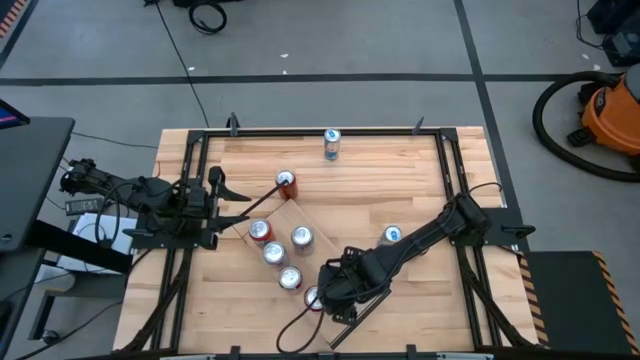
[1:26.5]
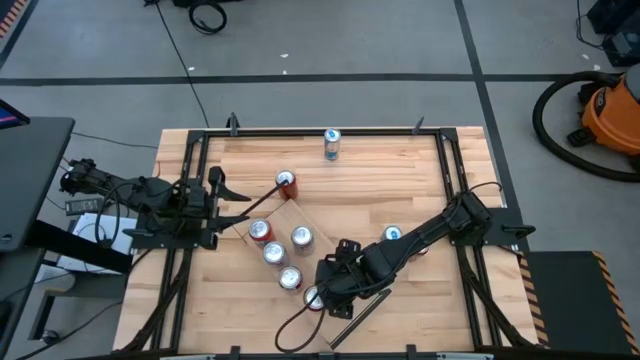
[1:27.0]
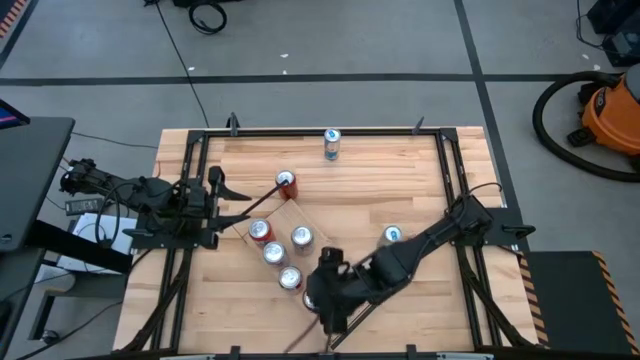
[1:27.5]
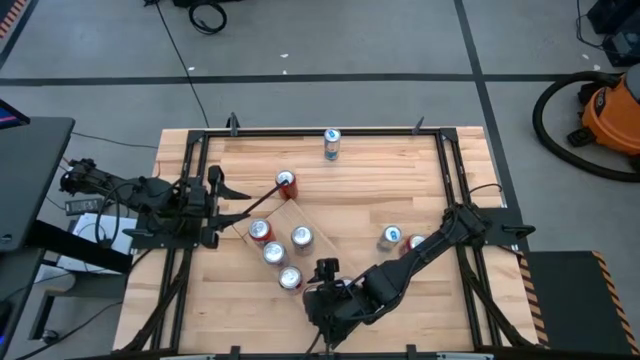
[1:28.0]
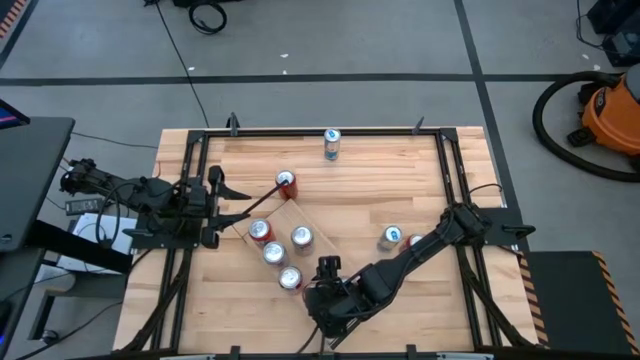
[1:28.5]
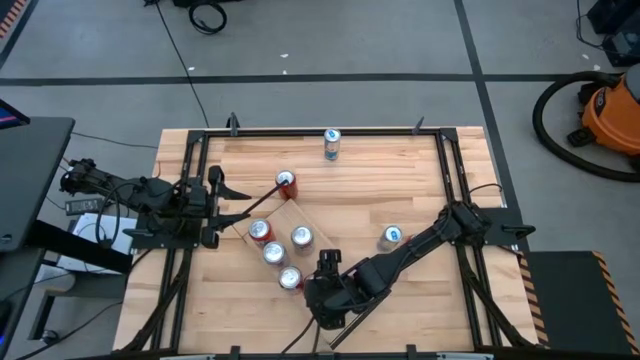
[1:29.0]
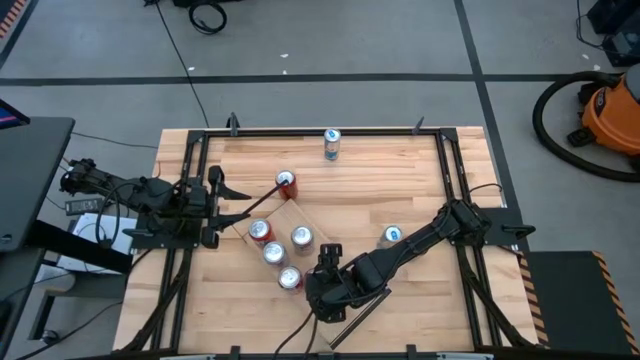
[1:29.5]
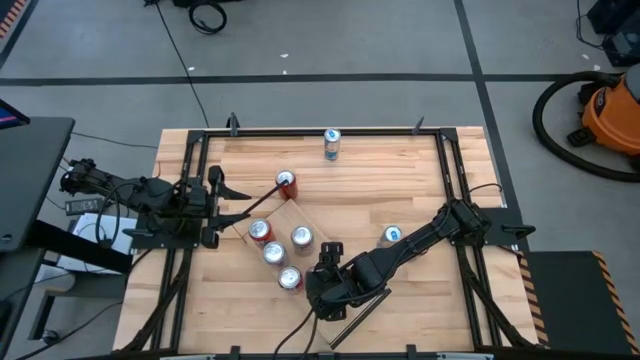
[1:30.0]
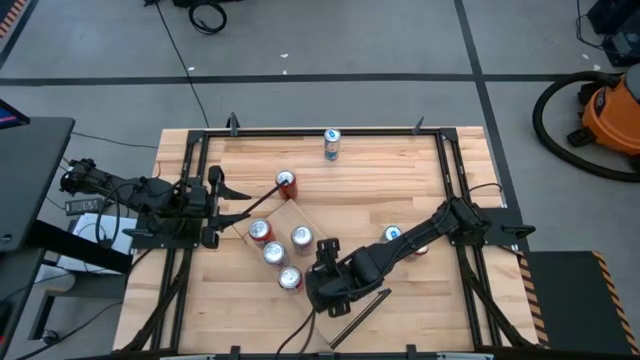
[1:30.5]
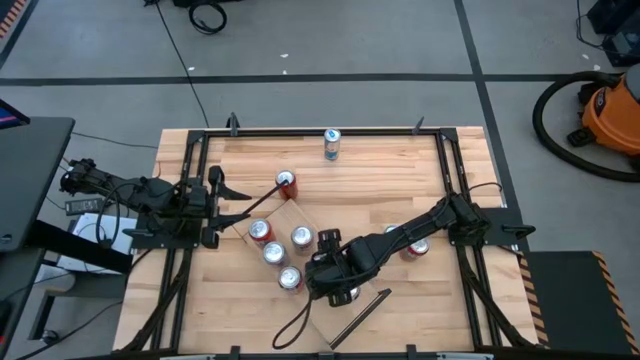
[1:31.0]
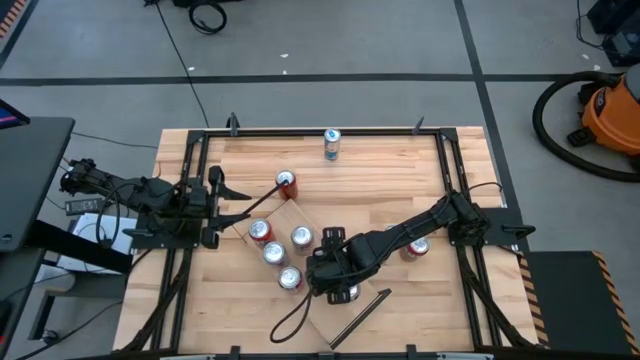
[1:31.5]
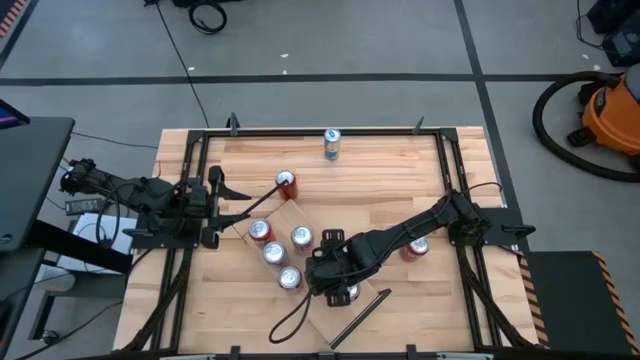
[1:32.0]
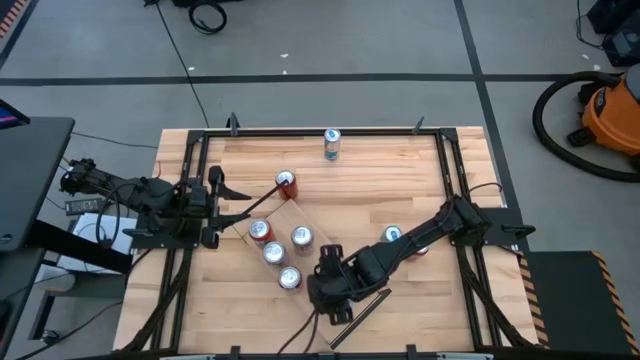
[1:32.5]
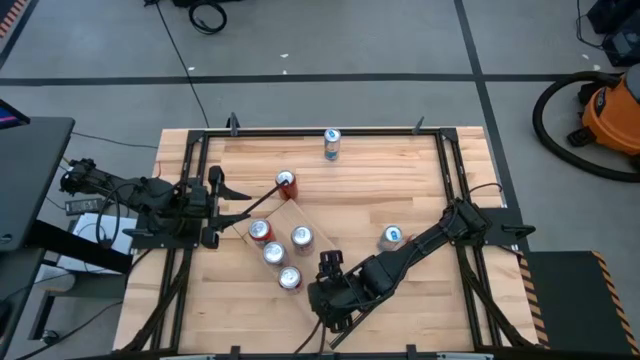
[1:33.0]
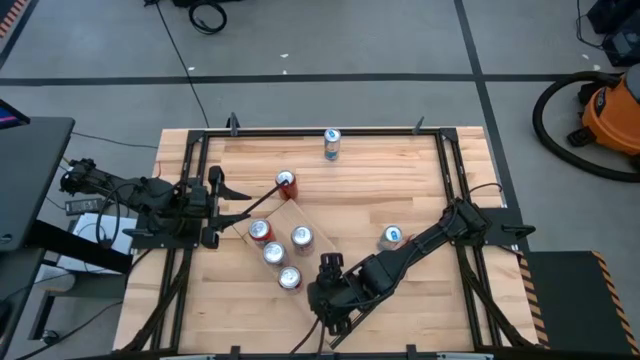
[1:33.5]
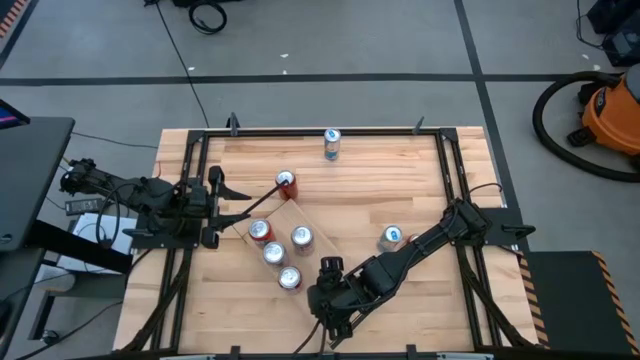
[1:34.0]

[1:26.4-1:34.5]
Task: Place canned beverage on shelf
Adjust the red and black soda can on the shelf

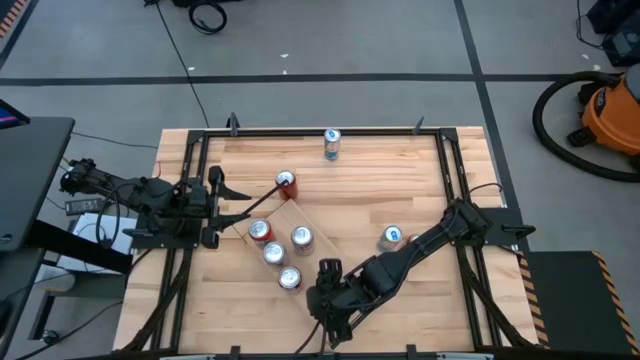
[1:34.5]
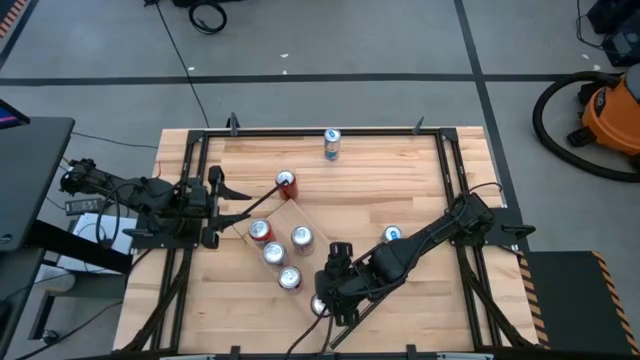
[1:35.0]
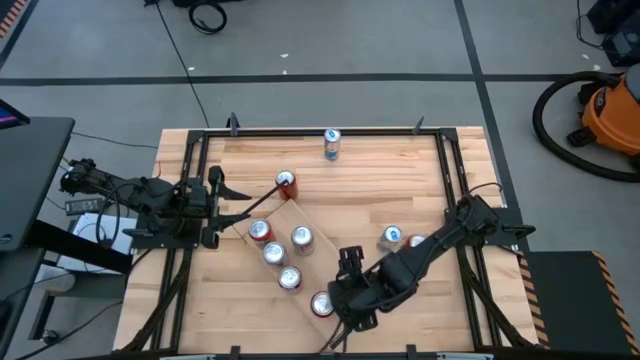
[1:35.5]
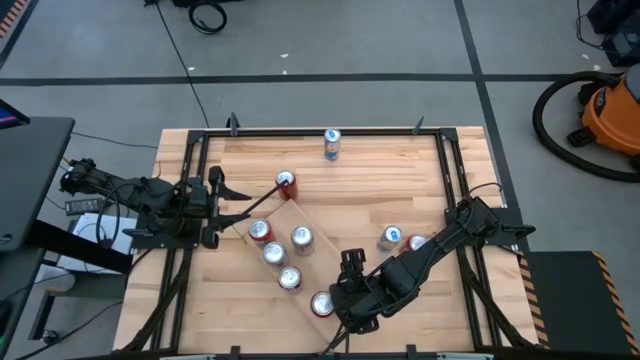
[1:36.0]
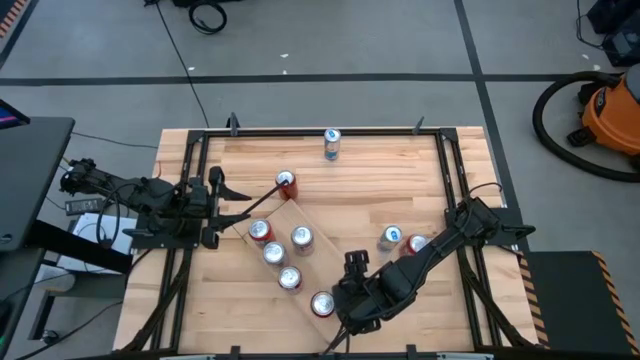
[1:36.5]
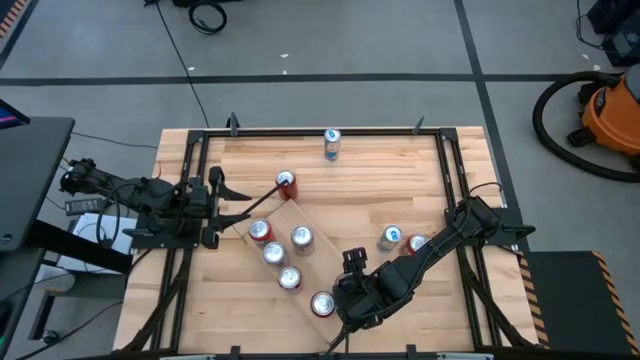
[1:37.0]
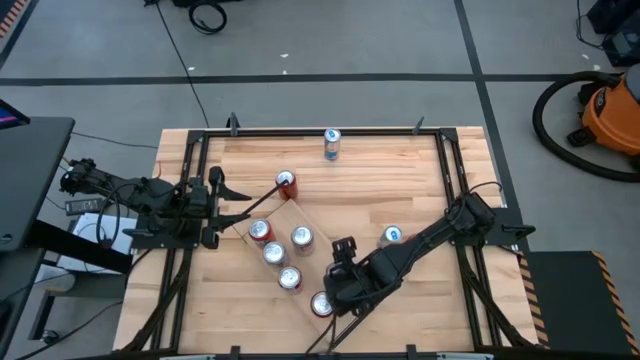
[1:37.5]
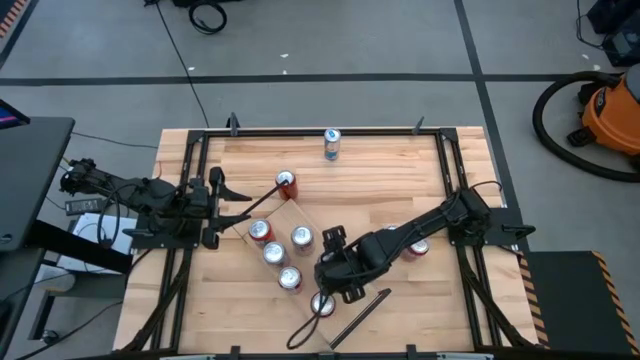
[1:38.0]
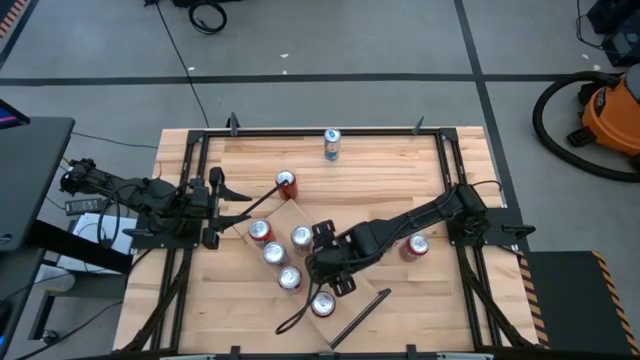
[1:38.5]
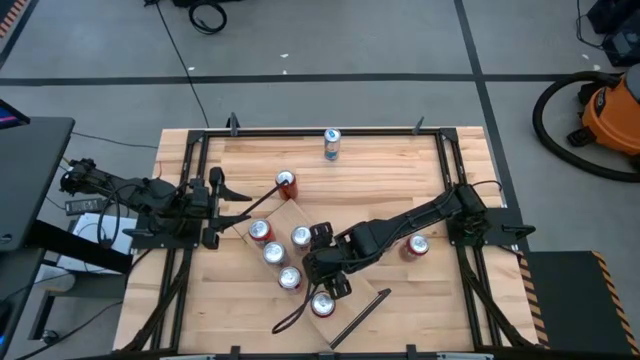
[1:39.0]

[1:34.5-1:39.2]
Move the red soda can to the center of the shelf

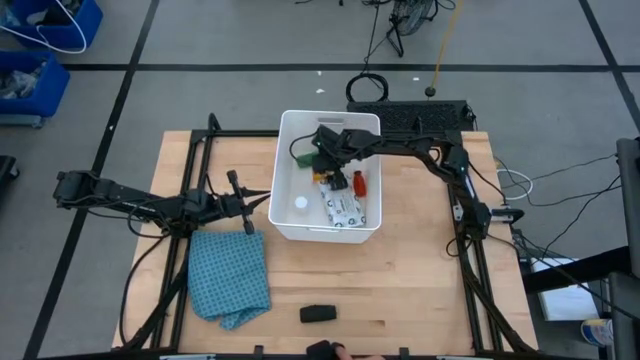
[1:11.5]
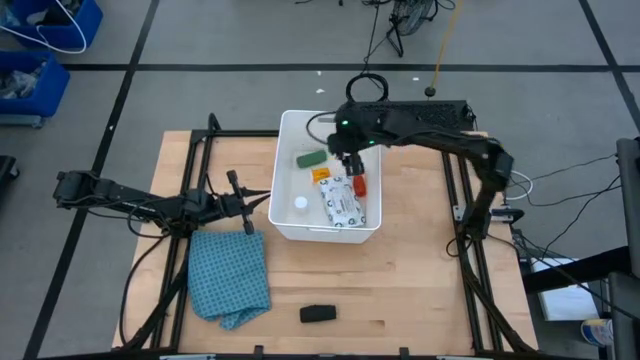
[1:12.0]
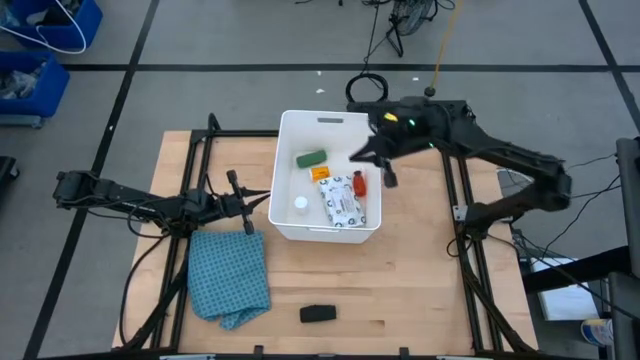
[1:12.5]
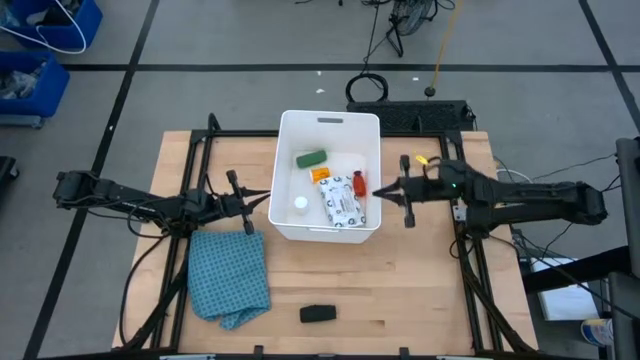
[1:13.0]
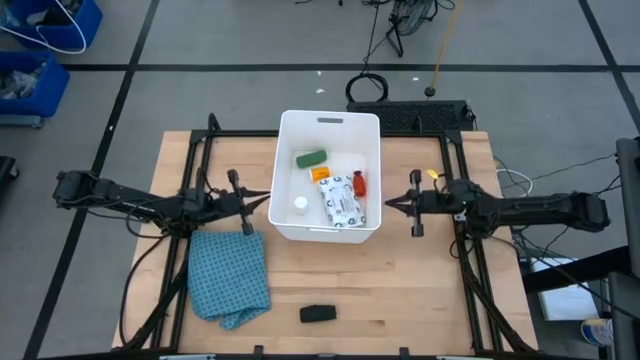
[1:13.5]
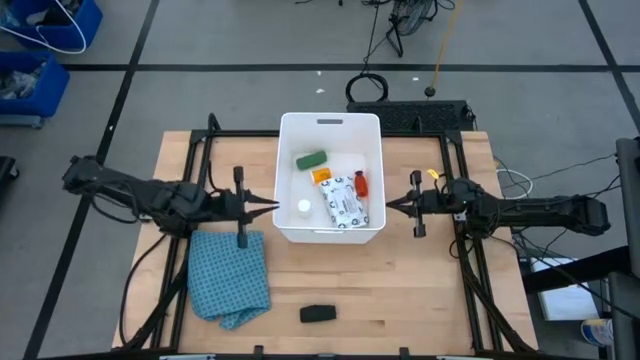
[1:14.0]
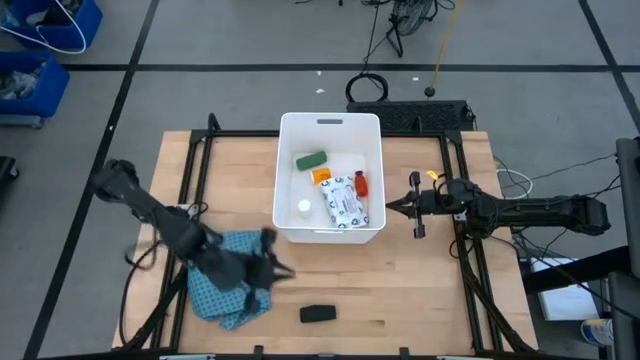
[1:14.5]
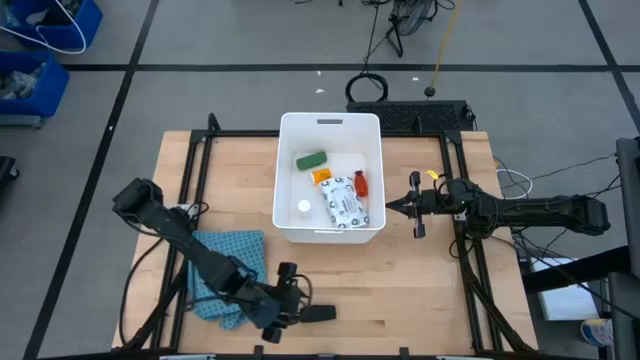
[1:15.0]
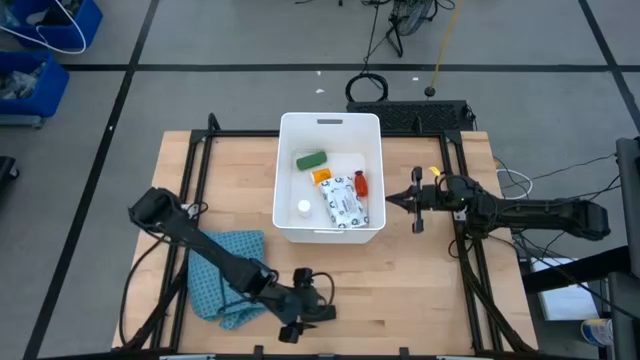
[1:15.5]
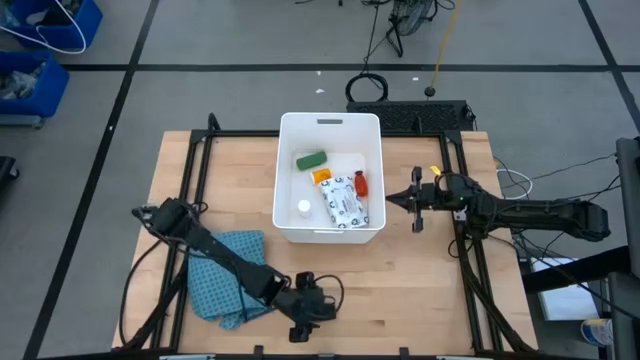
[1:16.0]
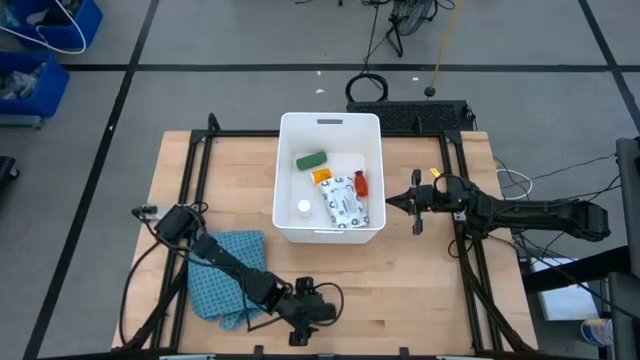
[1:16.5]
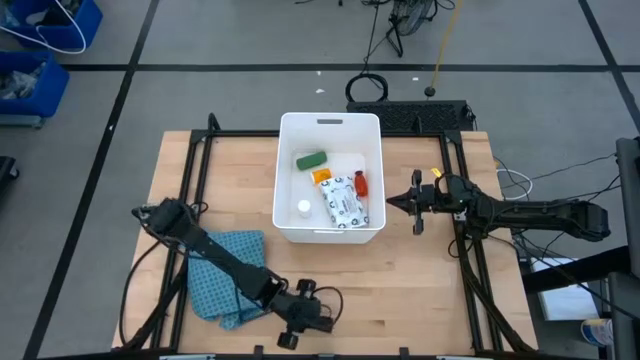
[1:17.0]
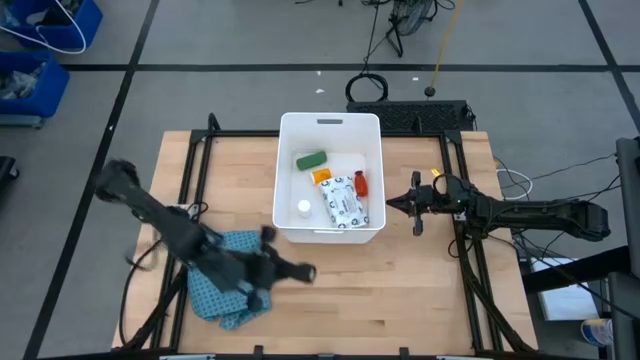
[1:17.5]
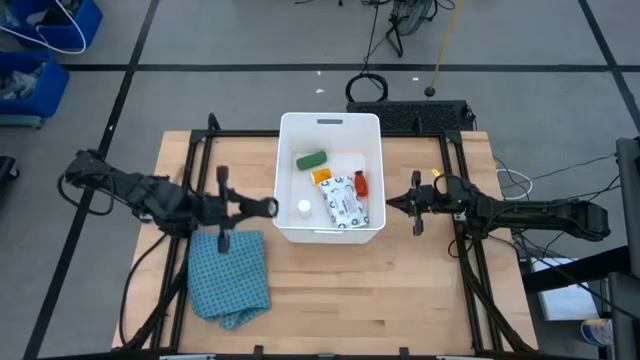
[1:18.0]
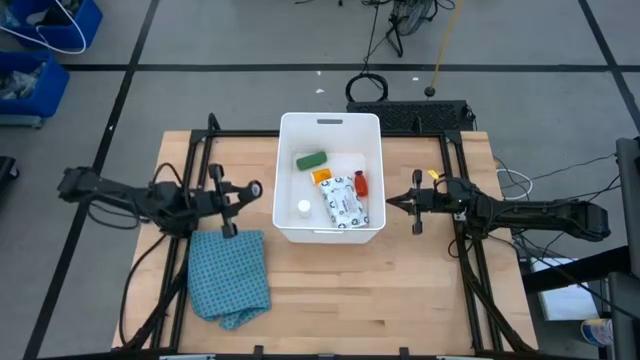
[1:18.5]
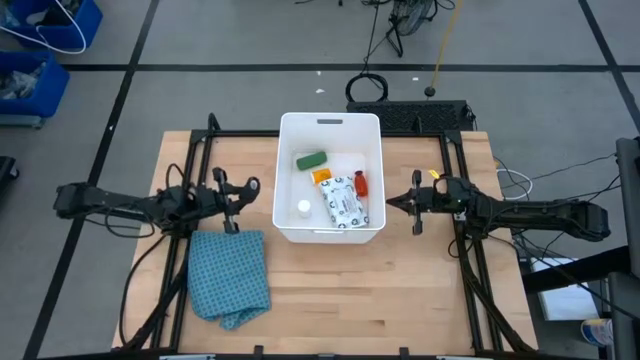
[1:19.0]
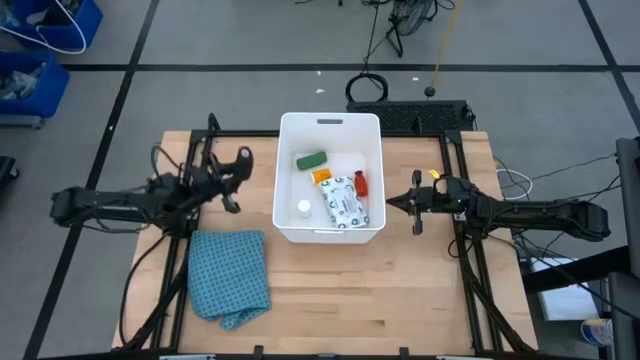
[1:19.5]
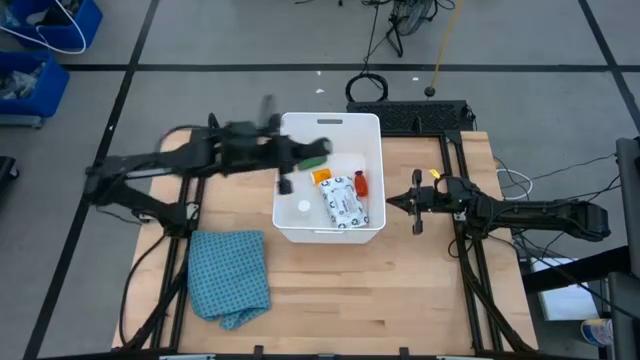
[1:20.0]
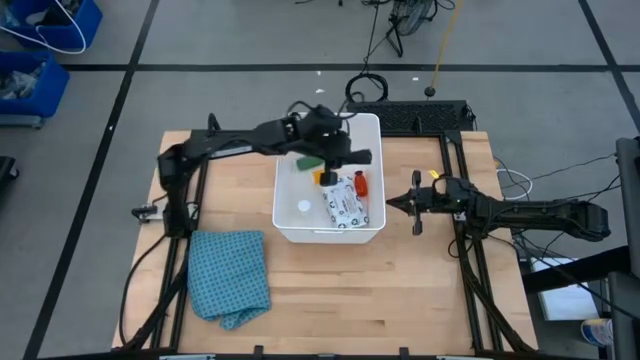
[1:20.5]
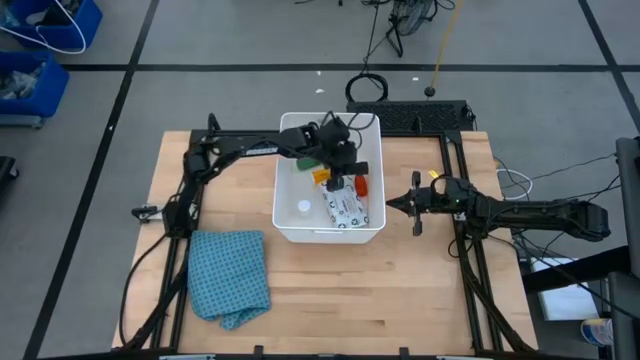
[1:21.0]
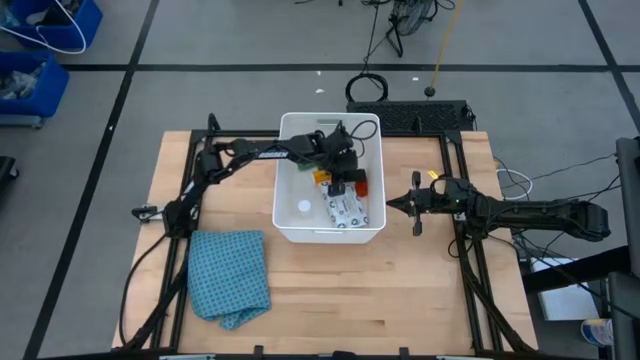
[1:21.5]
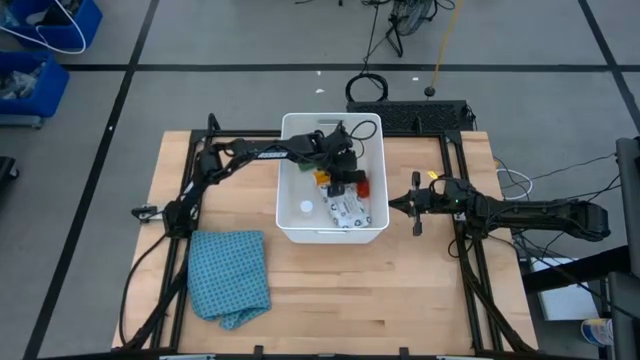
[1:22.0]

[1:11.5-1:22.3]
Task: Pick & place medical supplies in basket/bin
Put the black bandage into the white bin
